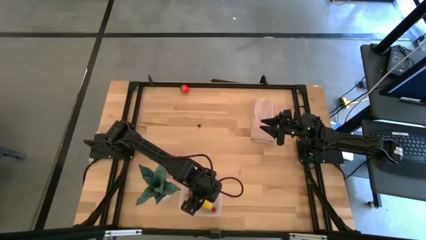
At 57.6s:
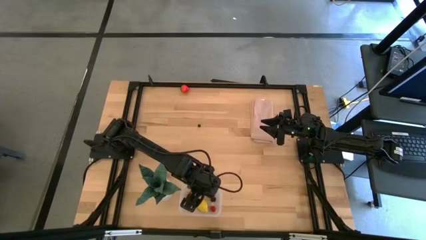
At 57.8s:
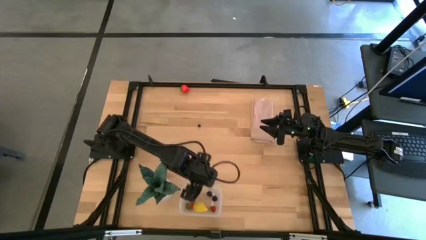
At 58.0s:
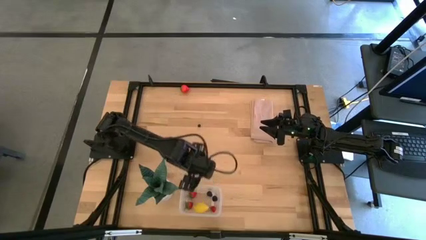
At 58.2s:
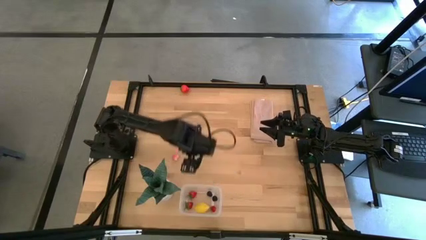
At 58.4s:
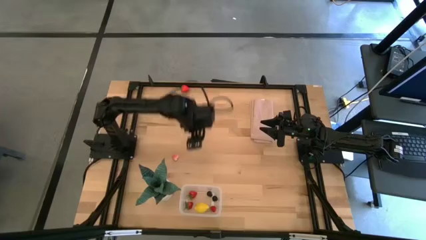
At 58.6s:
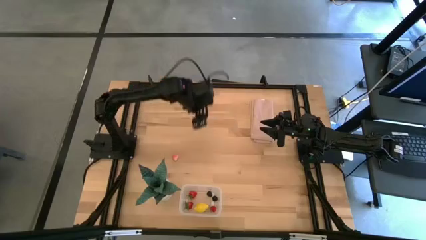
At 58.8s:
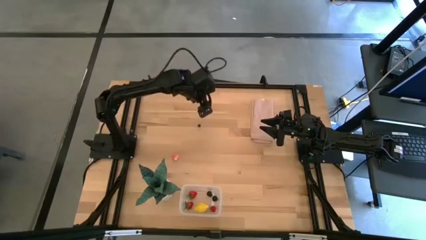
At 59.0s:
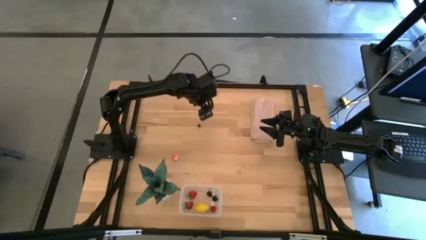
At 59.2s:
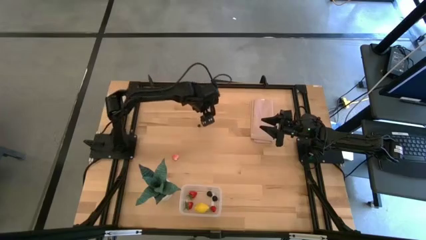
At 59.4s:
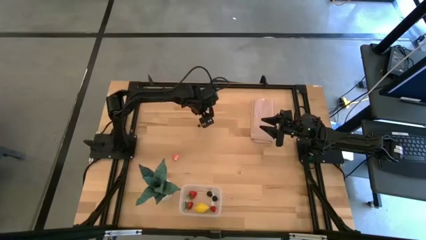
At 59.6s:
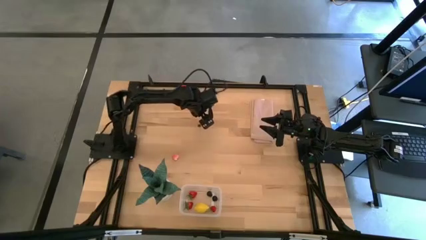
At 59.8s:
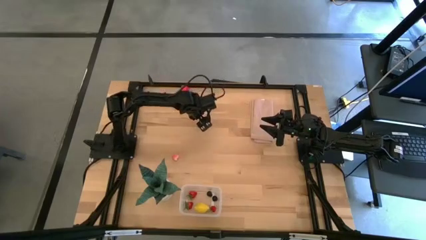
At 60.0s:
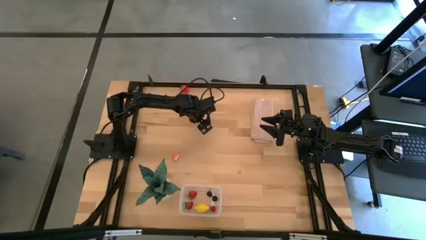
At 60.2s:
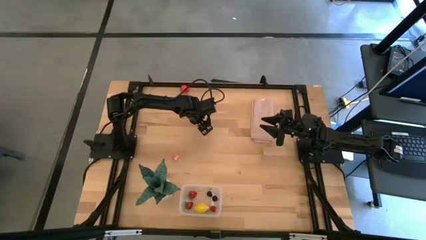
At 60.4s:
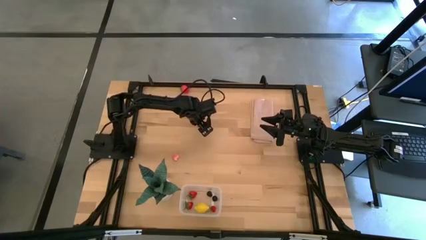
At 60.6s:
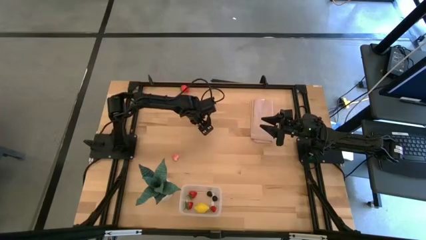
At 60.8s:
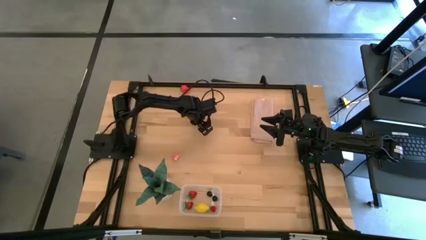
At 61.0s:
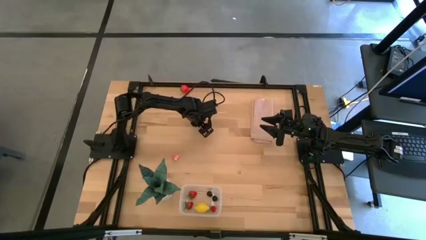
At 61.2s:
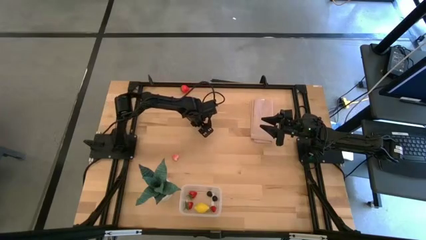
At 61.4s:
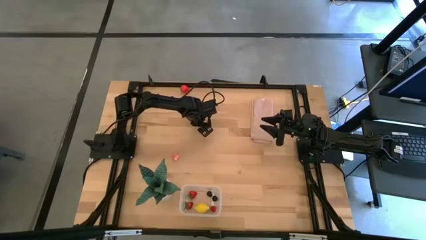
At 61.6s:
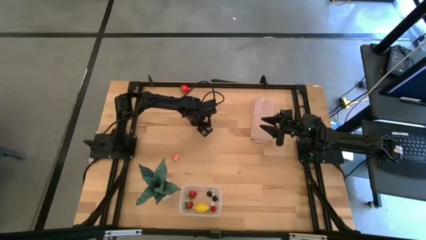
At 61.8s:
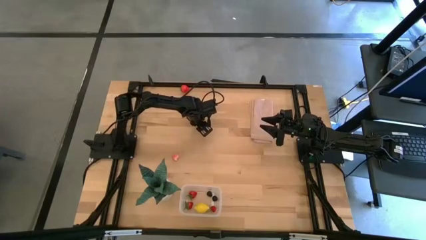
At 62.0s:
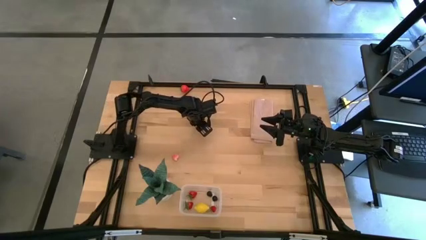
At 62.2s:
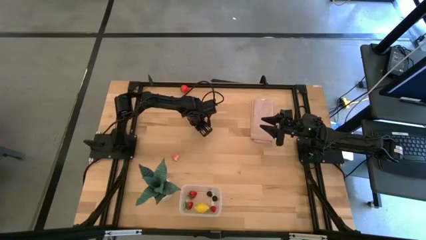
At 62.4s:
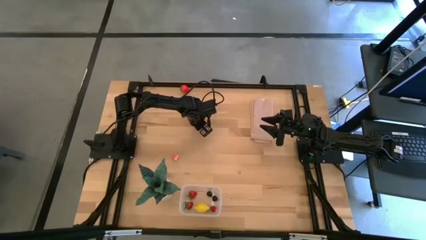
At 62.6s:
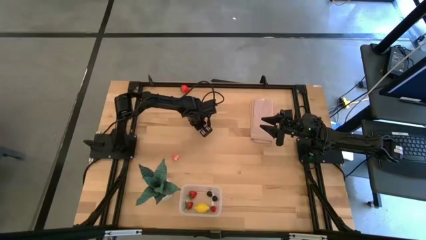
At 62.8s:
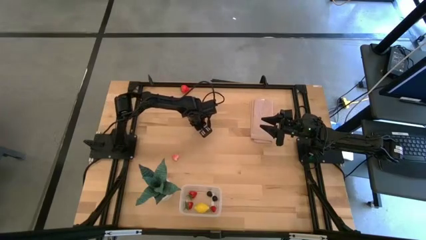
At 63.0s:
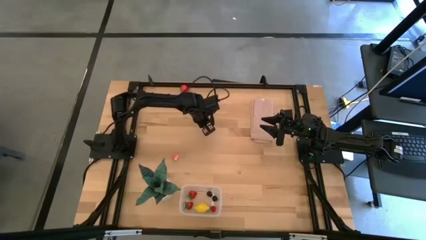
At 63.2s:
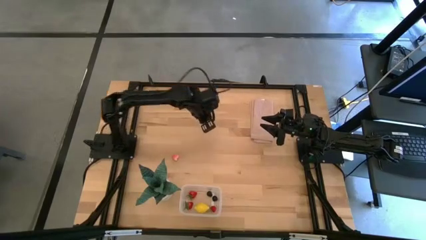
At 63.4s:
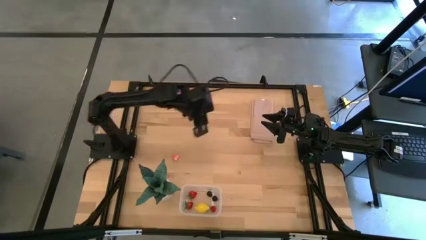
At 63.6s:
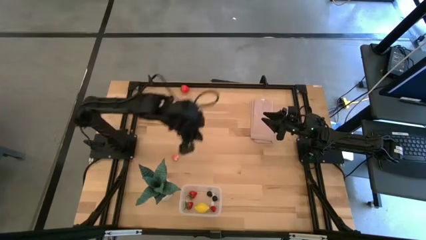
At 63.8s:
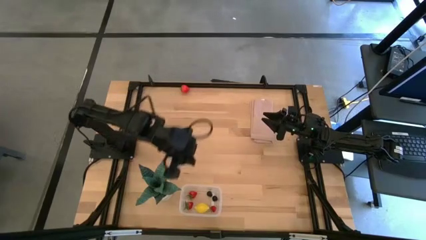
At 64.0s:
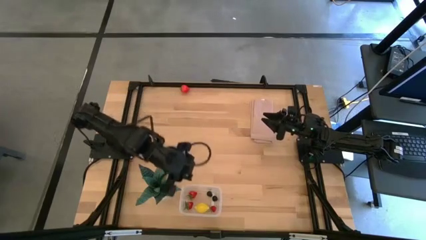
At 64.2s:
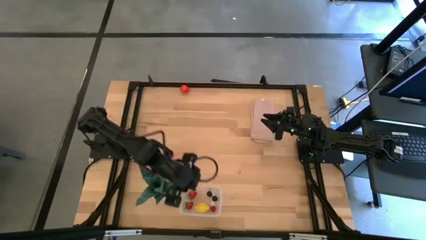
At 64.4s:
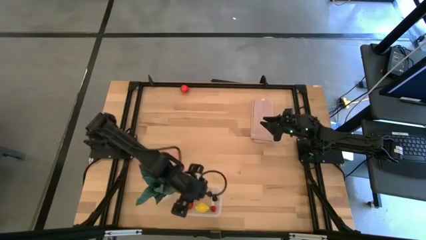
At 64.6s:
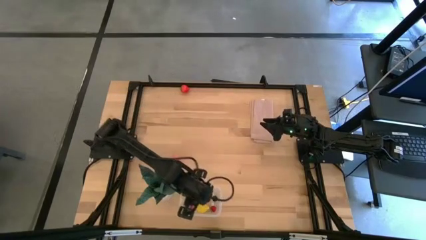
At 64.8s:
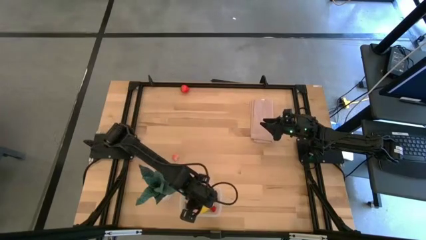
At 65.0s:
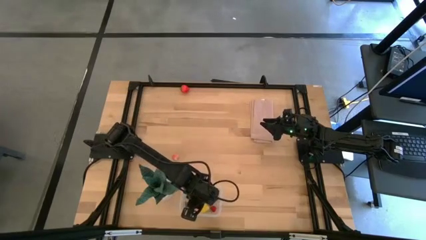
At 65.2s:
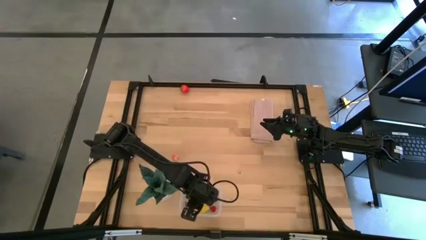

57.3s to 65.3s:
Task: Pick and placing Produce into tupperware
Put the blueberry into the transparent bin

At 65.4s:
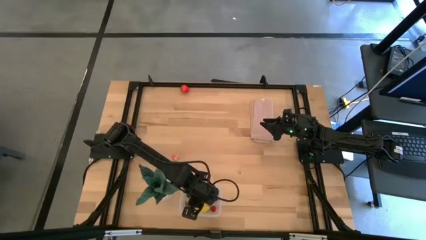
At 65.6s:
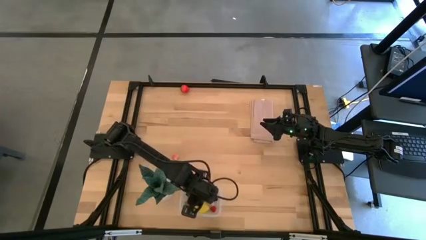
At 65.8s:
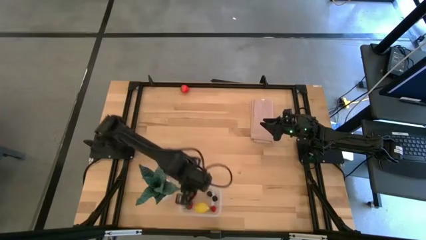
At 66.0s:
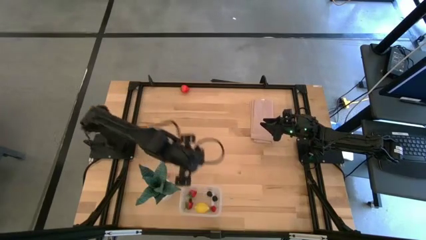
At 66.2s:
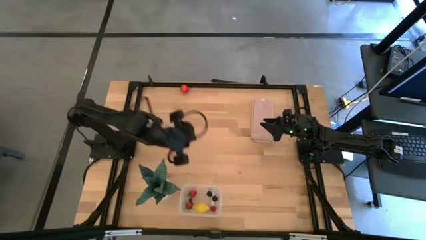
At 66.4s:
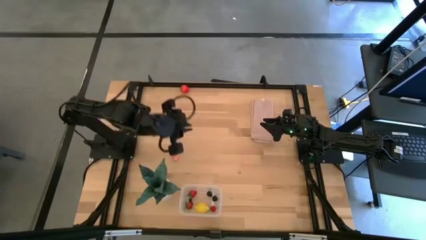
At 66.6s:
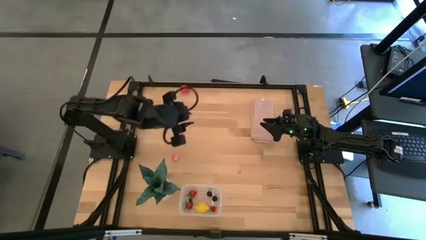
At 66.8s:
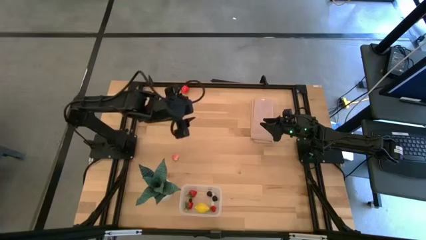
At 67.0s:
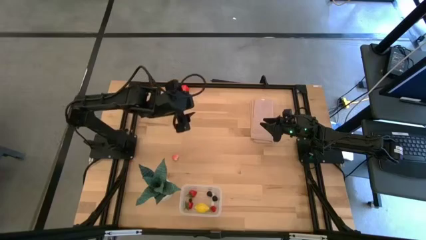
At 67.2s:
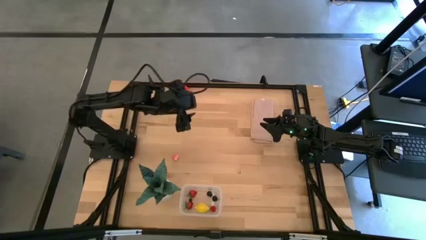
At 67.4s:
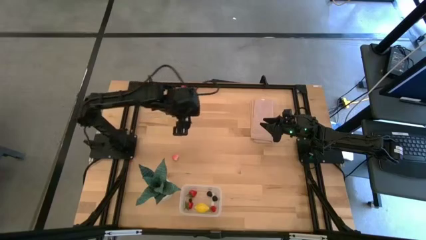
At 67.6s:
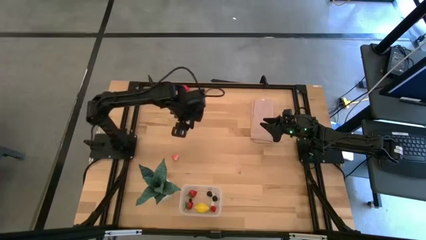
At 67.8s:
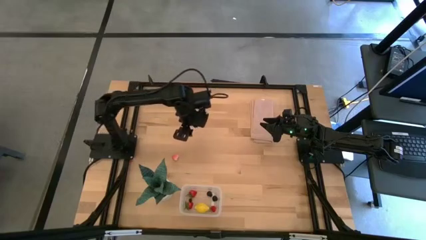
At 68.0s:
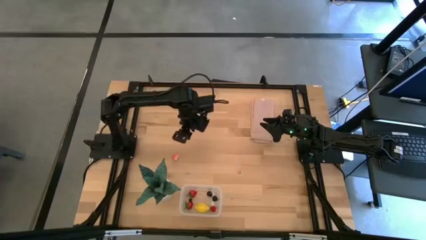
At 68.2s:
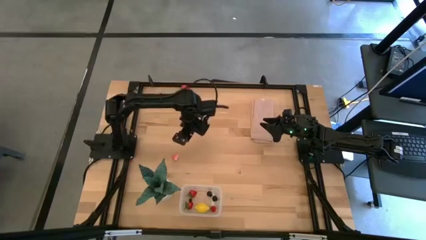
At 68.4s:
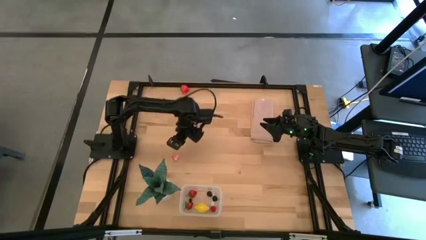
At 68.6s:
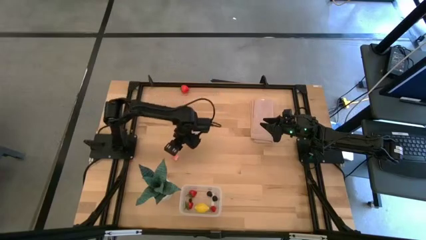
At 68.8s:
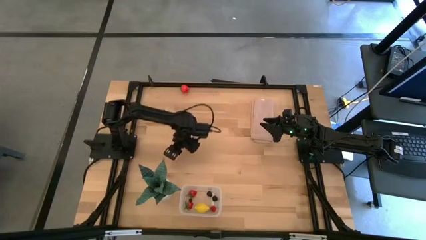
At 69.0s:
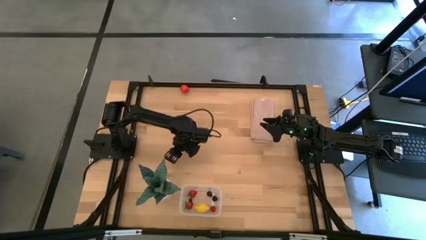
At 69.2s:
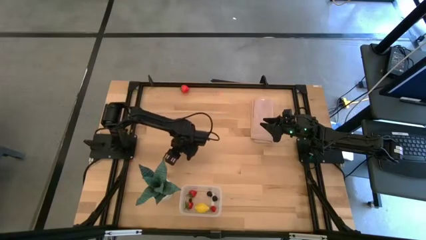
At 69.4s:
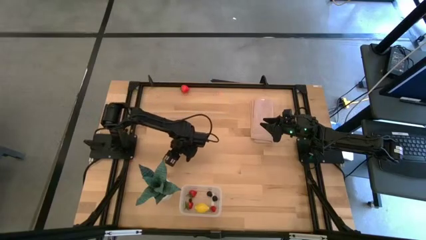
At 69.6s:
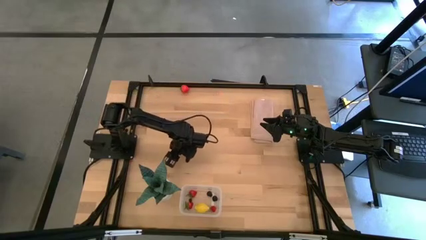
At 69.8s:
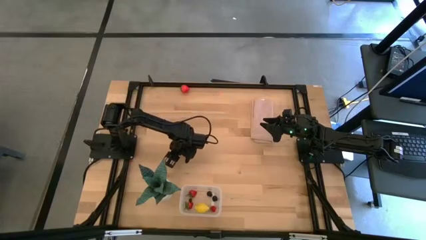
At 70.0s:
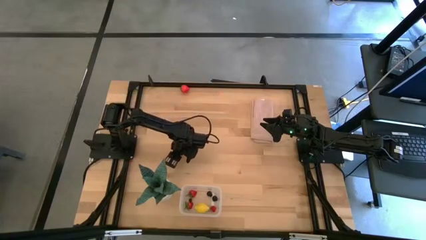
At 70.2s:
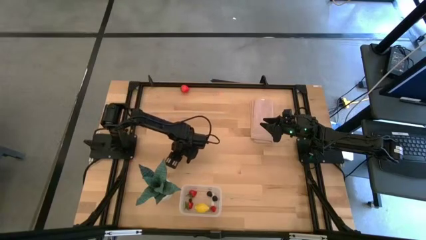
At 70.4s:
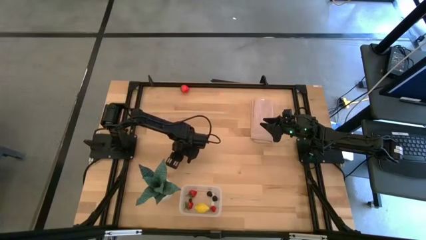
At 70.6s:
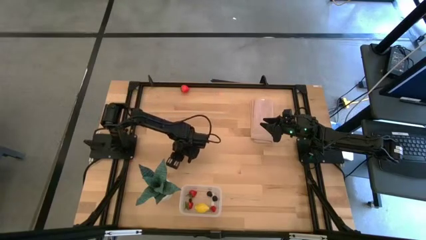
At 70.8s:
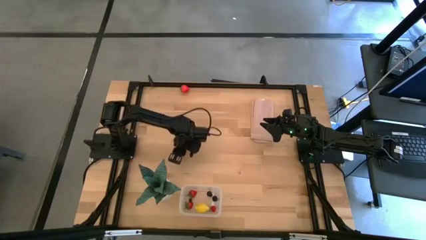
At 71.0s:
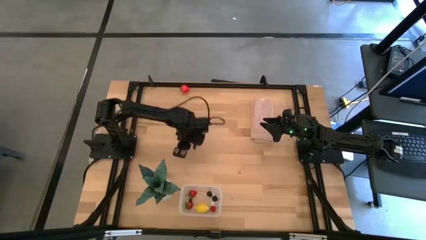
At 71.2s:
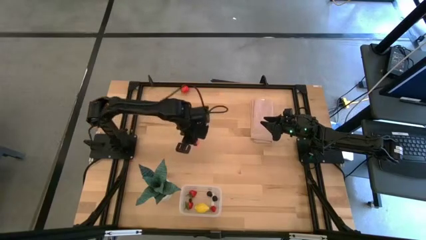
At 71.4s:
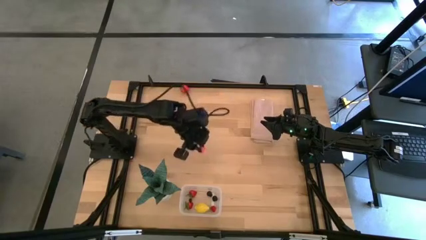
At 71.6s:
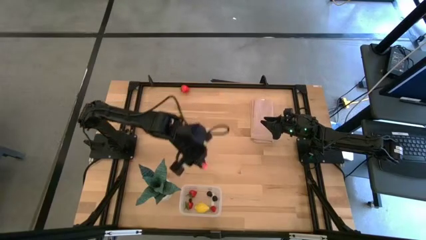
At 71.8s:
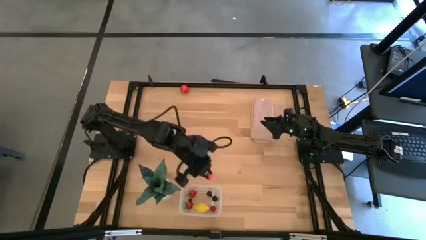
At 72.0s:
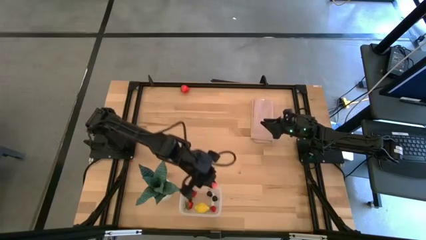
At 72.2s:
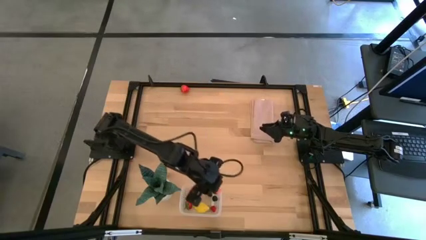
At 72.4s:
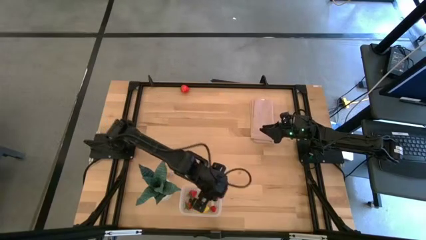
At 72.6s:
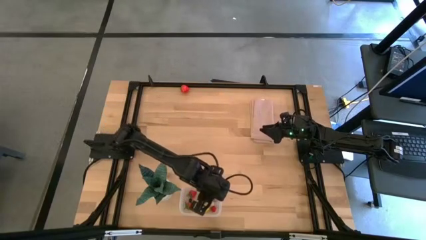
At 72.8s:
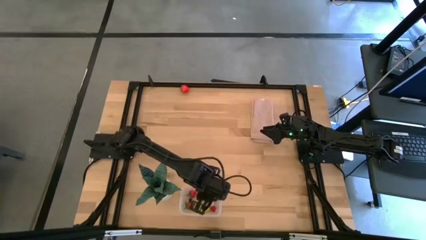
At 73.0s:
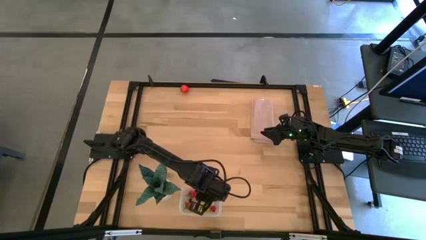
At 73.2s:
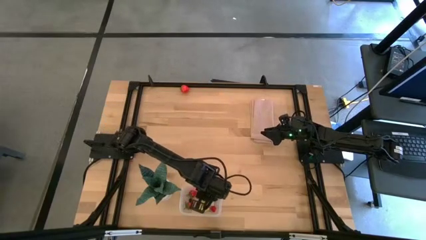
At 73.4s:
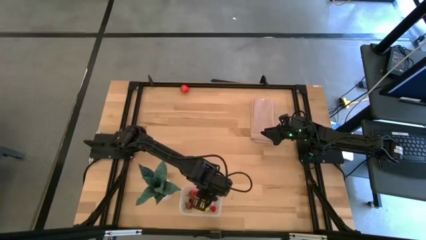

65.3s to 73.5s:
Put the peach into the transparent bin
